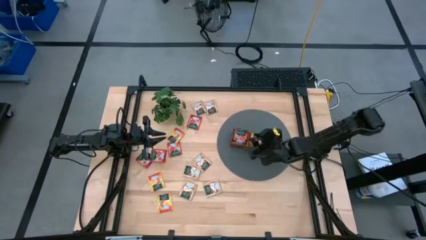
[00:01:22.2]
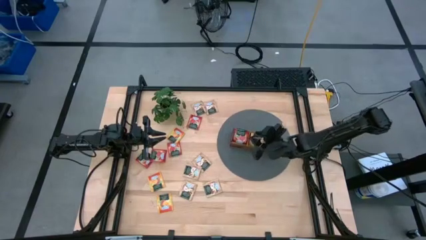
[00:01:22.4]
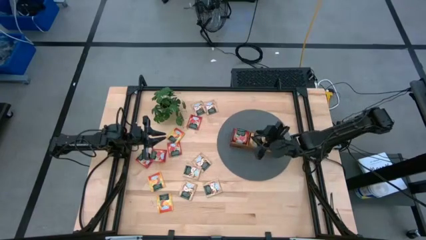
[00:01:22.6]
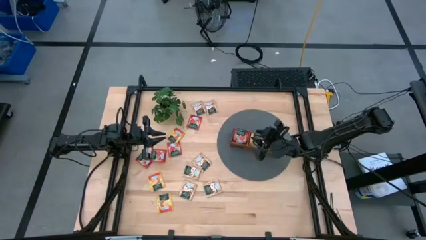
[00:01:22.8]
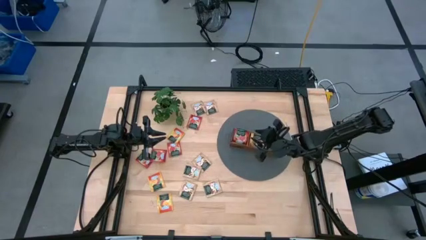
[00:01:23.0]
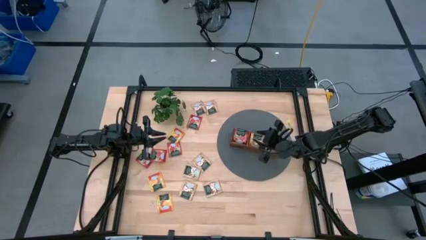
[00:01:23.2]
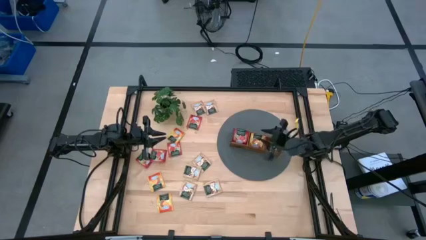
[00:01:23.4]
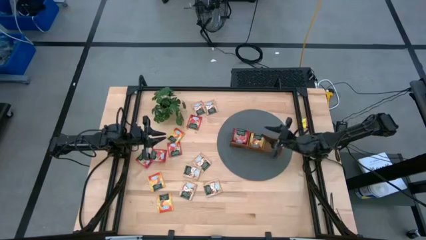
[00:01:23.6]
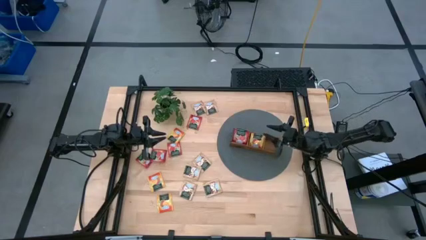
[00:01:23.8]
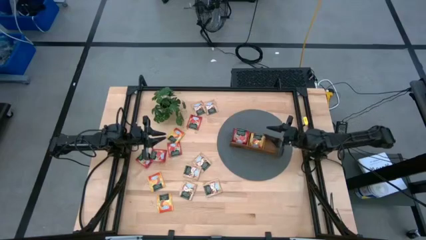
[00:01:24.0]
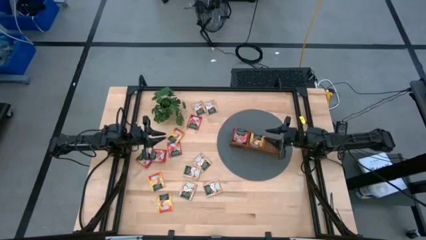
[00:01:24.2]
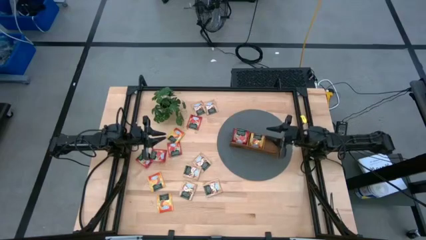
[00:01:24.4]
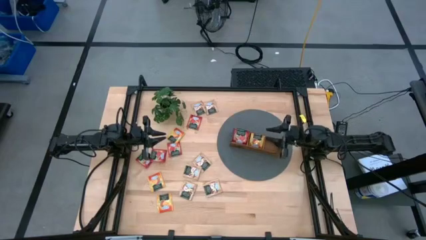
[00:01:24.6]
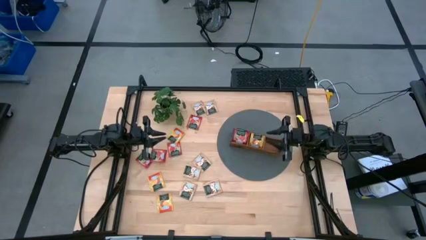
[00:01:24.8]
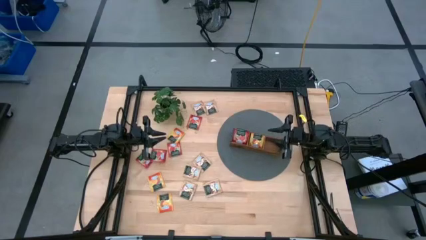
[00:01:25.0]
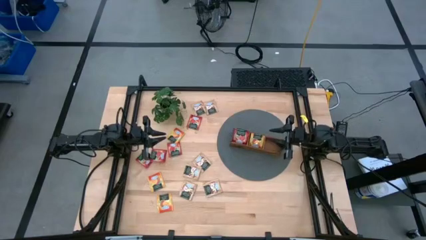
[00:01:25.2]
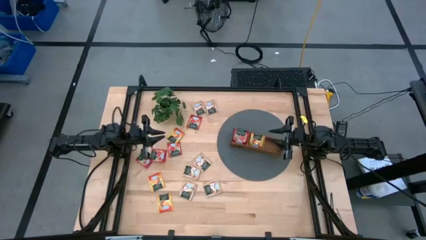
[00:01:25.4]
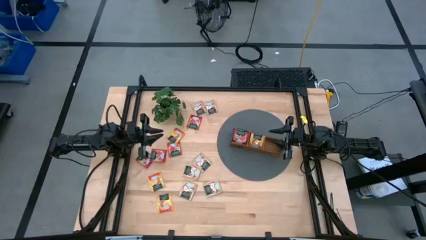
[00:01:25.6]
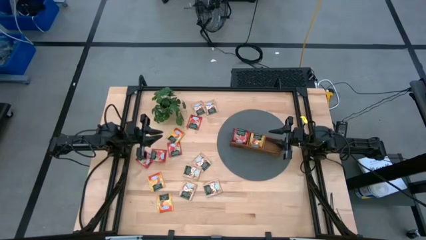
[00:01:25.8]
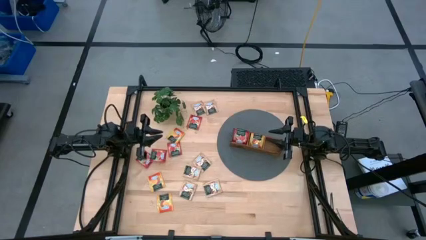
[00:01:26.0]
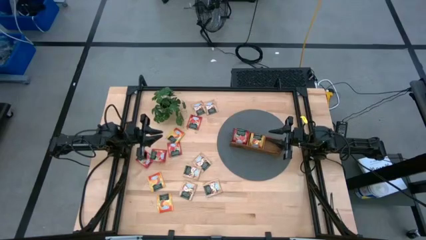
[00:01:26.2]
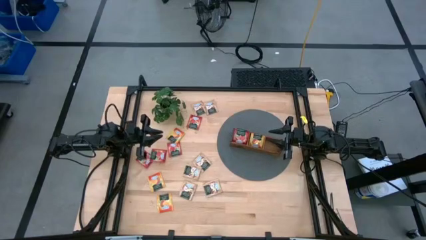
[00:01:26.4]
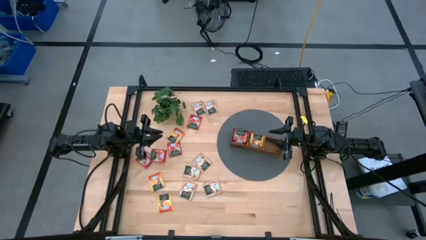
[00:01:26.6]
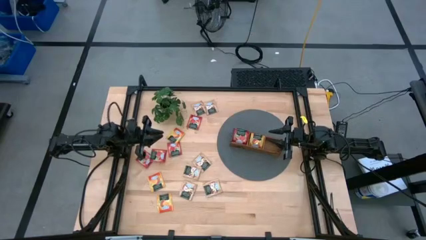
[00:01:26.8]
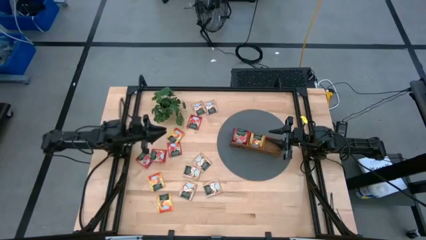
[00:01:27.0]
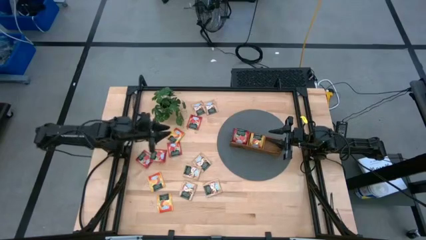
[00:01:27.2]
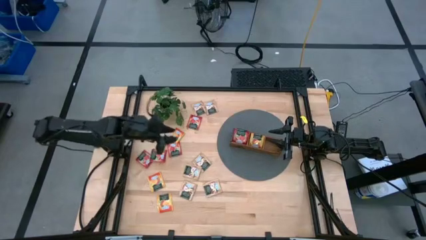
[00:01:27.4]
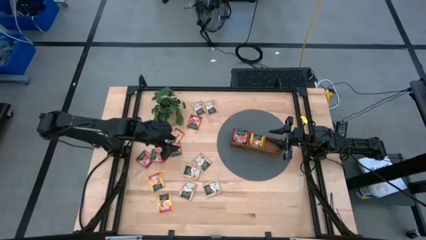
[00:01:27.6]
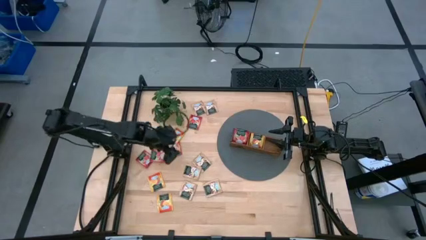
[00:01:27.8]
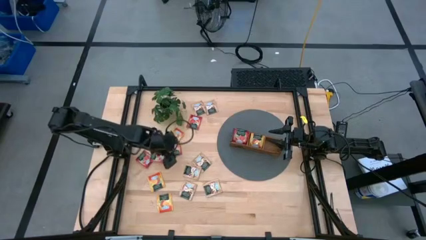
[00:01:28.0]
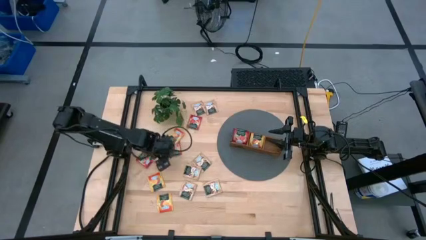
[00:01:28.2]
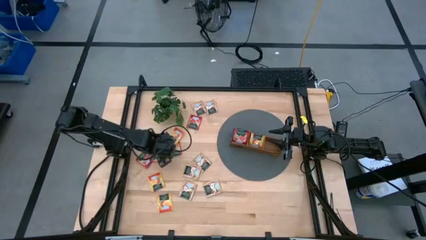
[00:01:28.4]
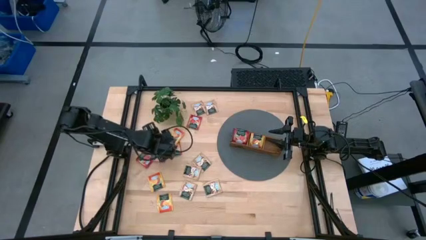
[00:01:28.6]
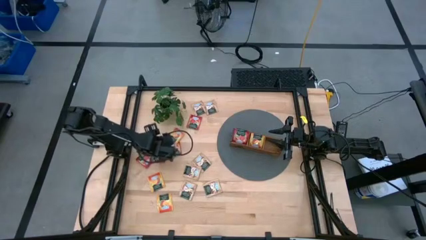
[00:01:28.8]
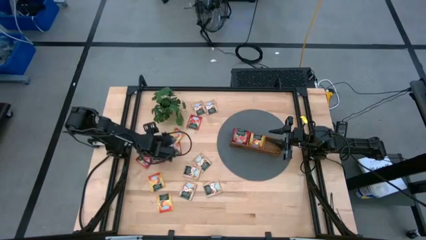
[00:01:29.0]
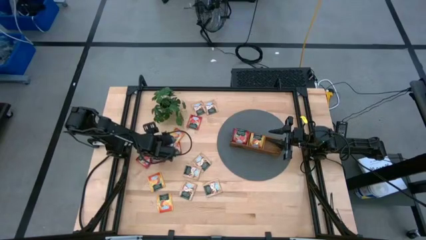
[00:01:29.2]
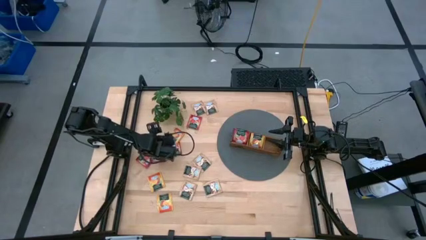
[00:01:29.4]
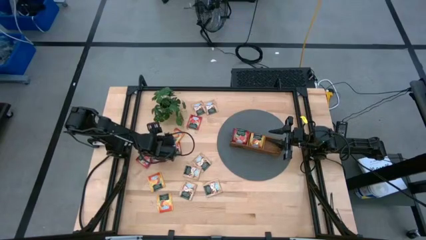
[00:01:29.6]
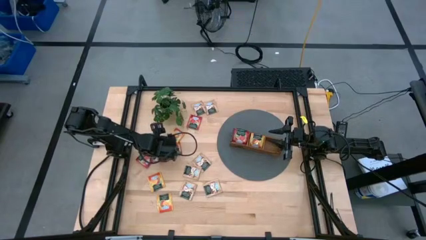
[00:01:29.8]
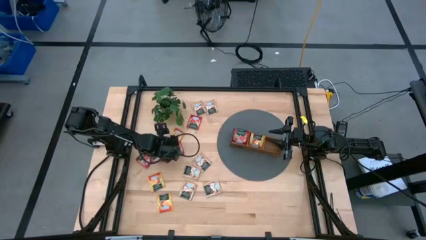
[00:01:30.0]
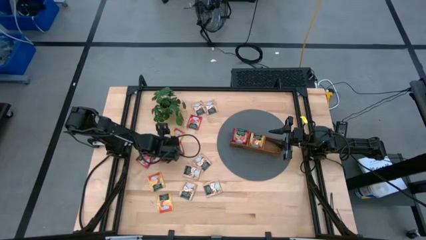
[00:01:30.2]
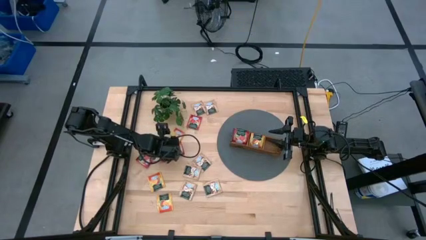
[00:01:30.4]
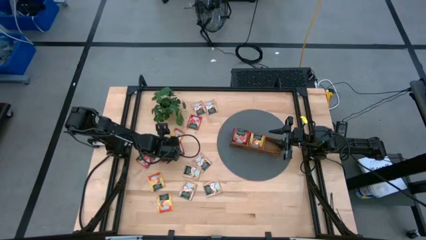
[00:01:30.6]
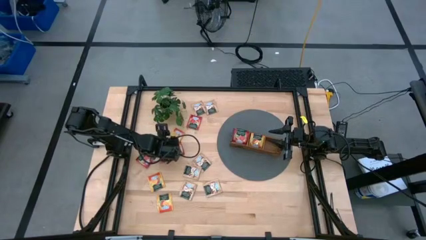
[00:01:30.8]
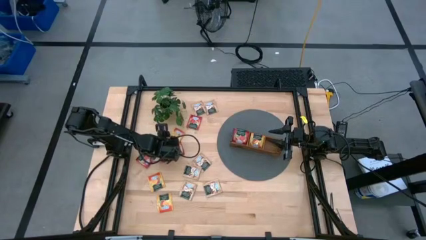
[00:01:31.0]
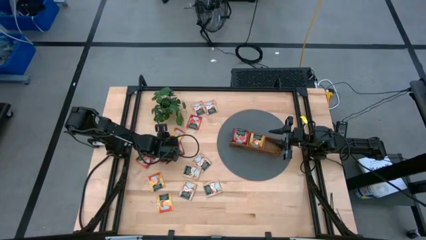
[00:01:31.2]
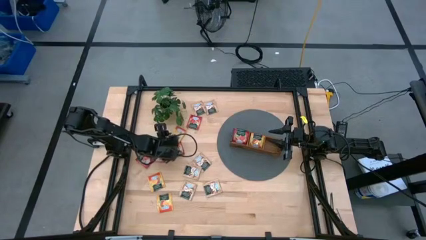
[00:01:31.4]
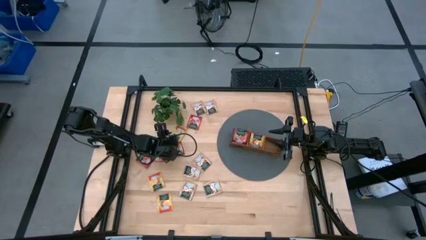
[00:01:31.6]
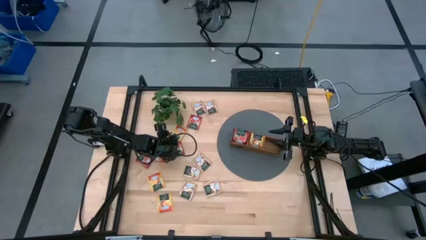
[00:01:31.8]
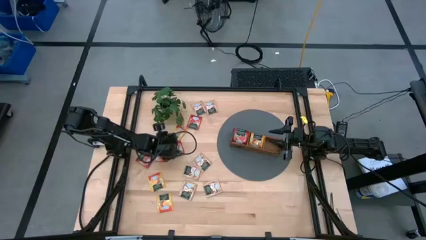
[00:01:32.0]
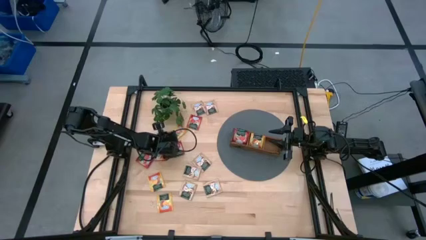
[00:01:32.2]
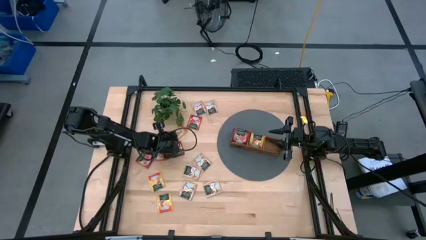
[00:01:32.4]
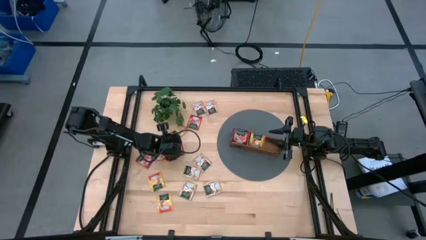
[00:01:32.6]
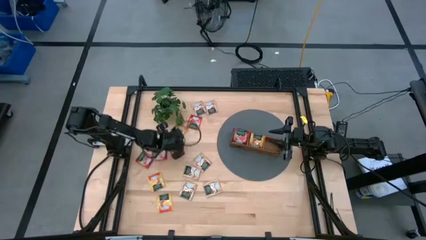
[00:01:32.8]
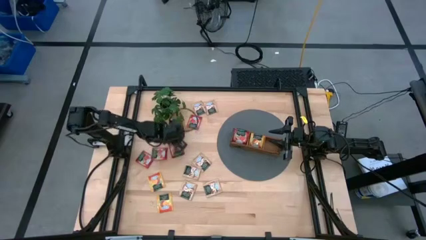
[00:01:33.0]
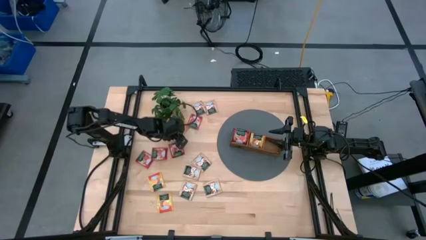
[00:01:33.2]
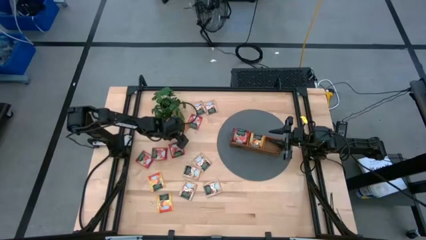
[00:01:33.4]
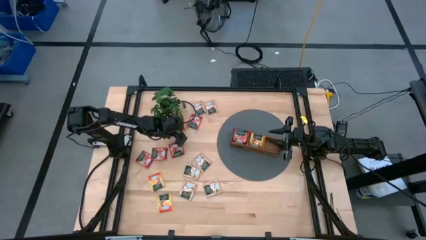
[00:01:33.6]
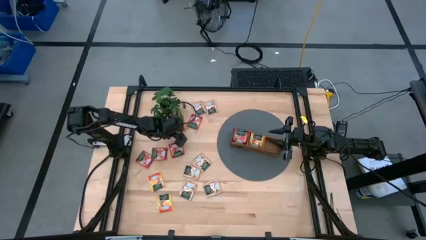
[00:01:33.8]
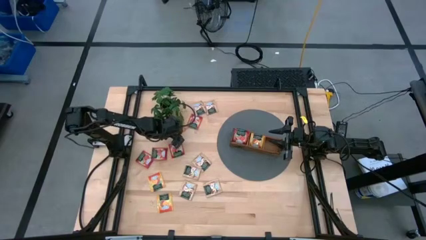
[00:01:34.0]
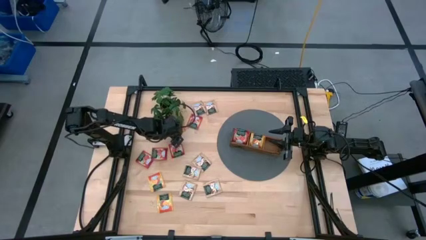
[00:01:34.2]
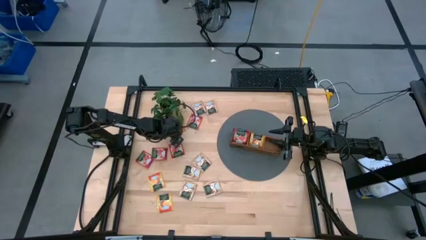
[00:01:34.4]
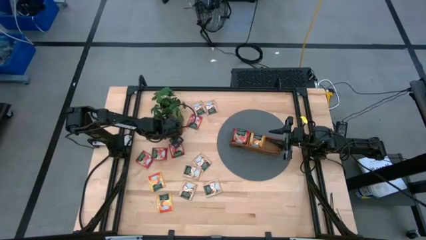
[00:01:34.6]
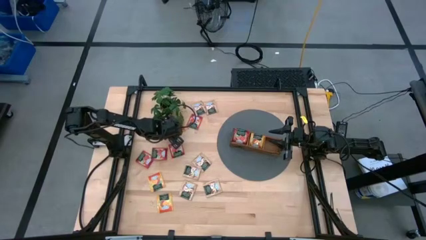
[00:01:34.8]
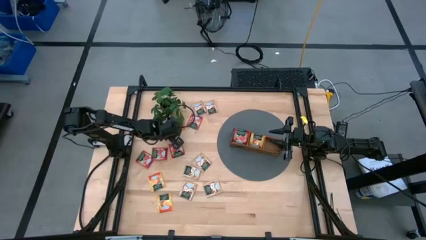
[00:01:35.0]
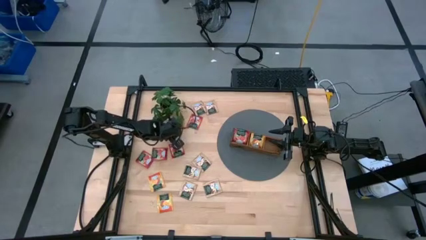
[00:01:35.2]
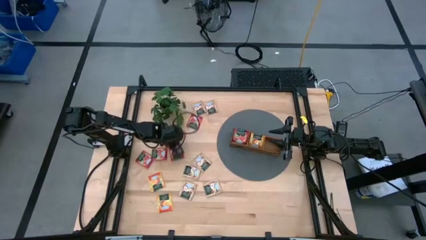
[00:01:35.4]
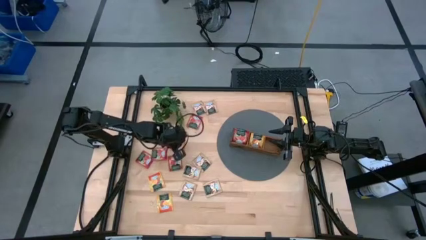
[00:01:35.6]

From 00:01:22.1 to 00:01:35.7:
Task: Pick & Place Tea
Put the yellow tea bag into the middle section of the wooden organizer
